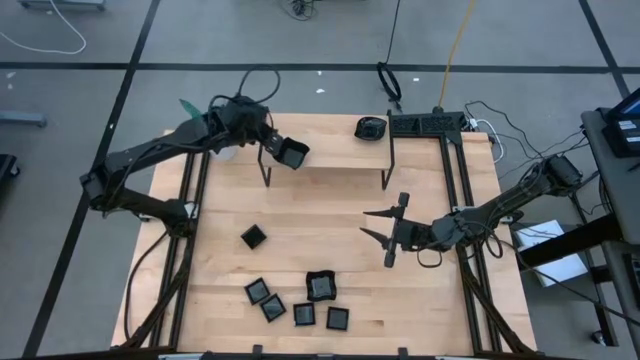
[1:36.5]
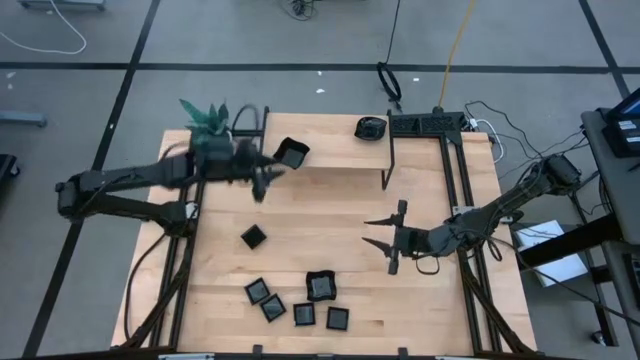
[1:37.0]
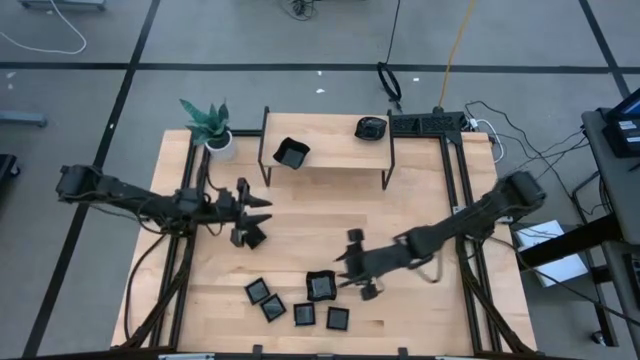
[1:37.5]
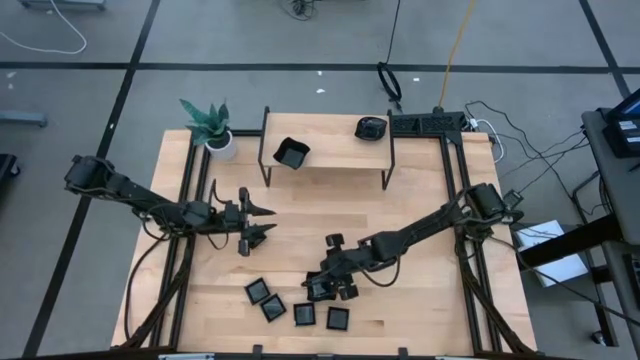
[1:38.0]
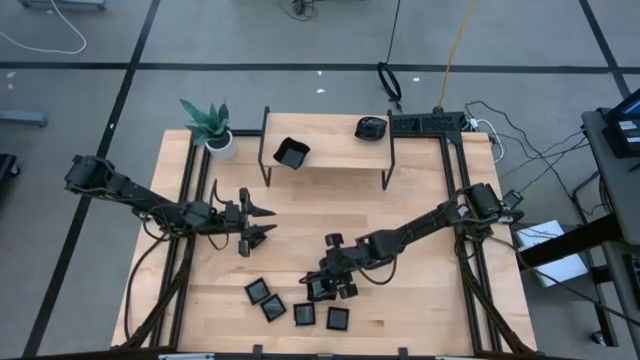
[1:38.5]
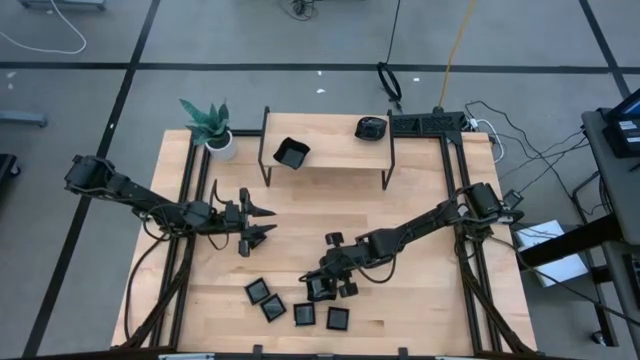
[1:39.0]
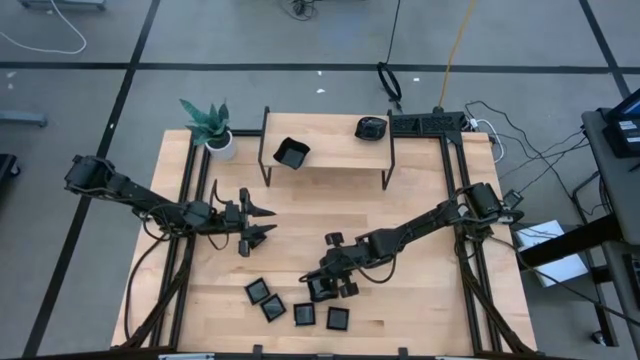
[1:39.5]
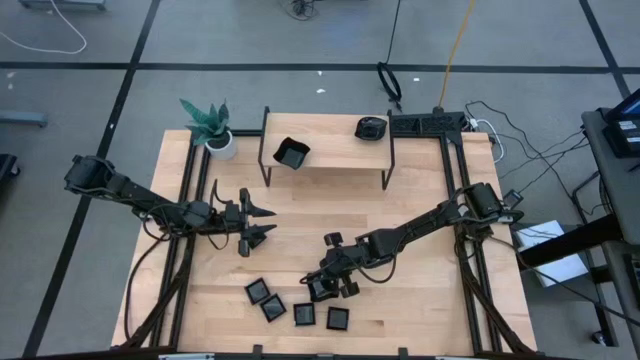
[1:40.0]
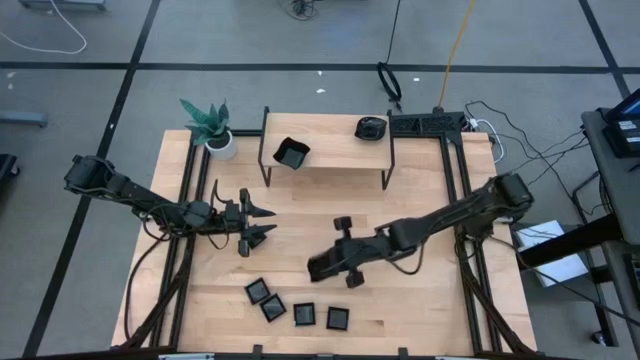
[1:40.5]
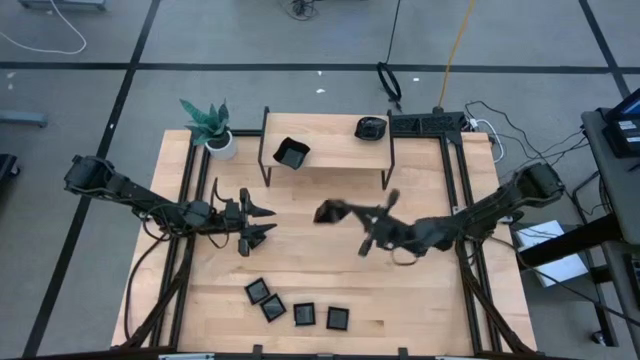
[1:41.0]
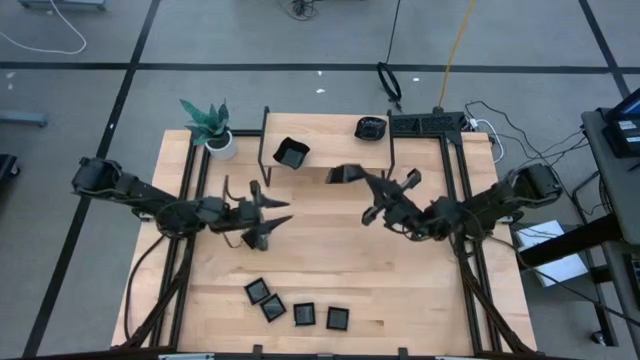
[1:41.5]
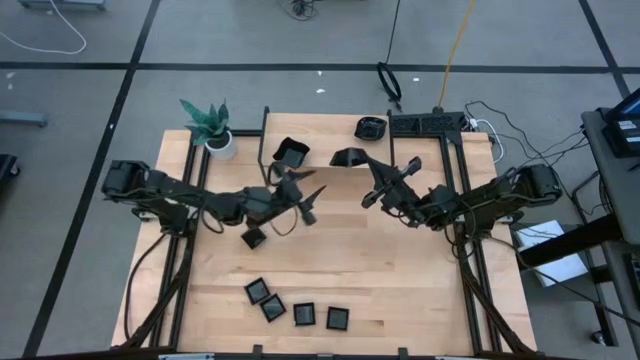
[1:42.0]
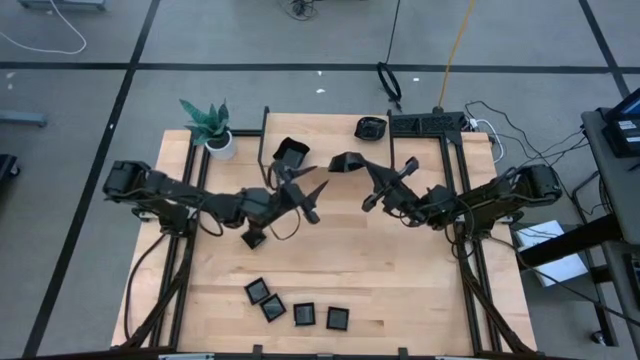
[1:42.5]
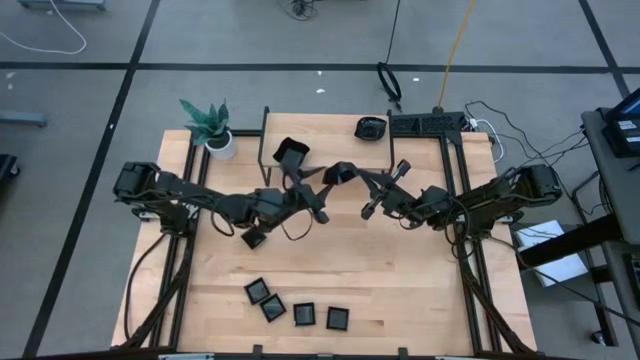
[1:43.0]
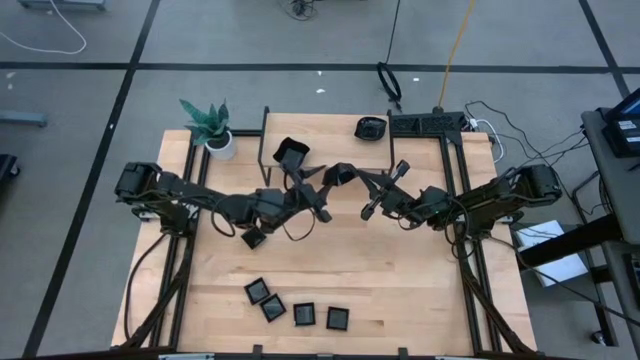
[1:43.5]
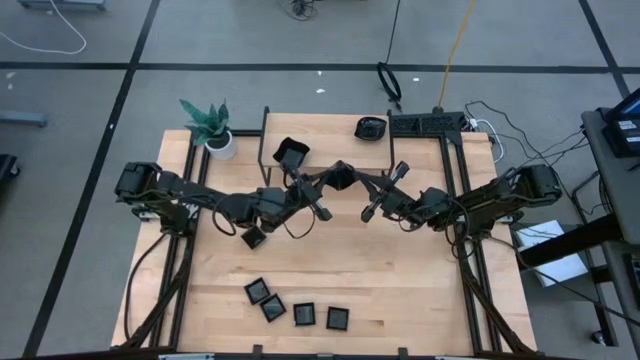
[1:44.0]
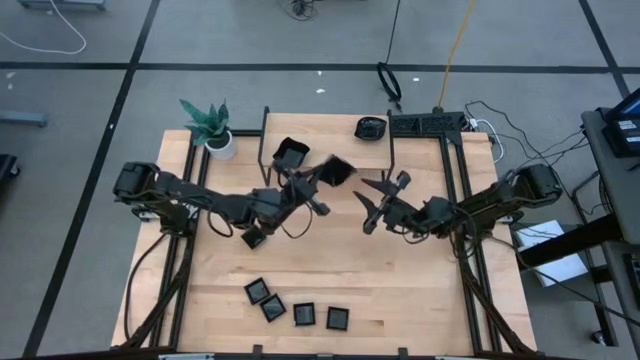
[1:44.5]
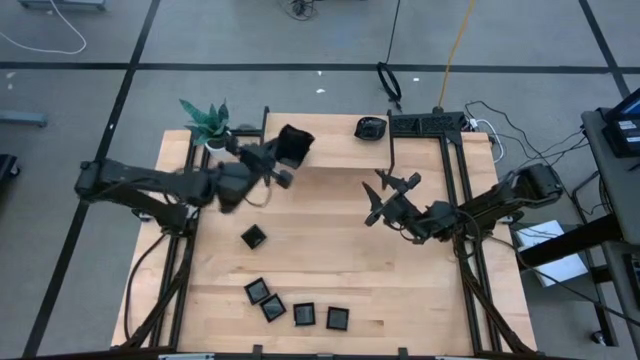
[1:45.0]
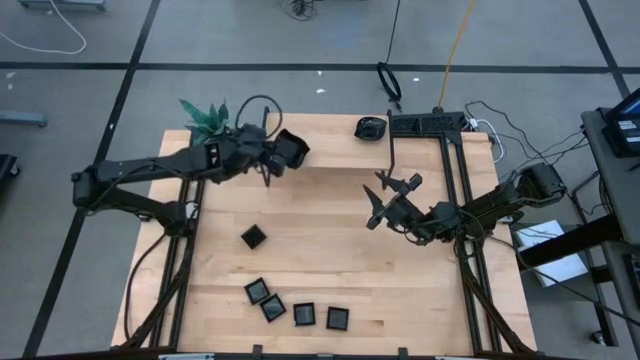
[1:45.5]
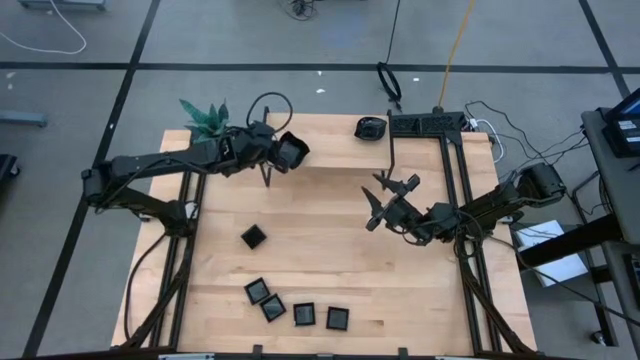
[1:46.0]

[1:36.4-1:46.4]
Task: Pick & Place Mini shaped plates
Stack the black distorted square plate on top of the other black distorted square plate on the shelf

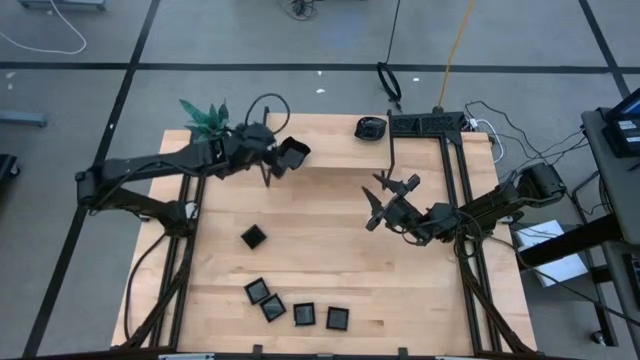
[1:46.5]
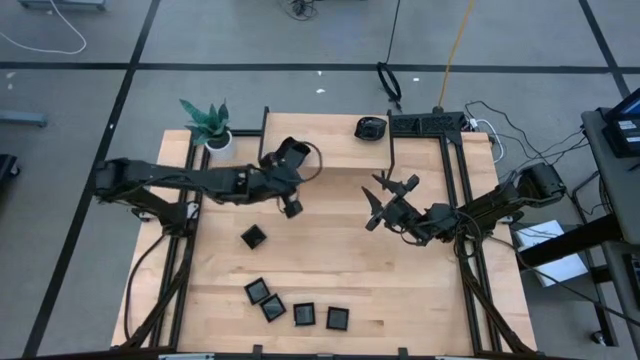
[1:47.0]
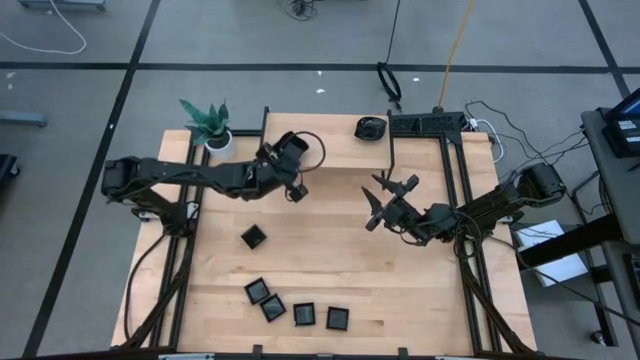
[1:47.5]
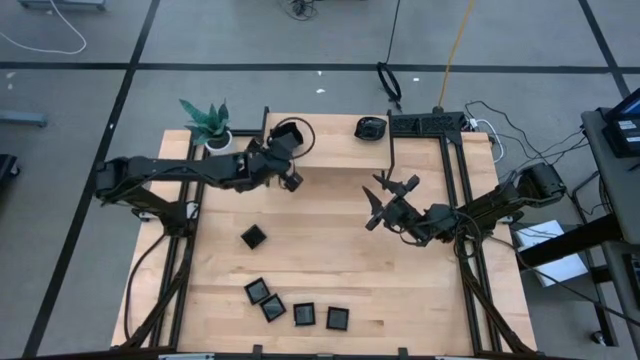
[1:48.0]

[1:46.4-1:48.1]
Adjust the stacked black distorted square plates on the shelf

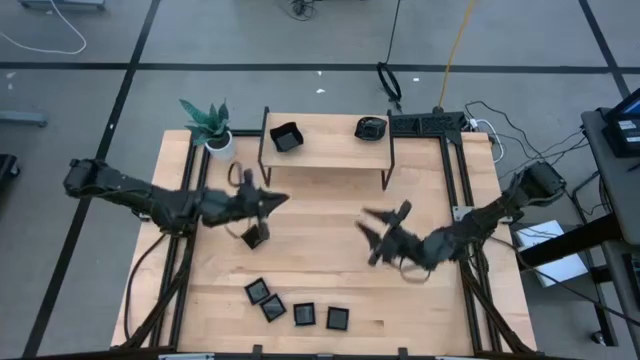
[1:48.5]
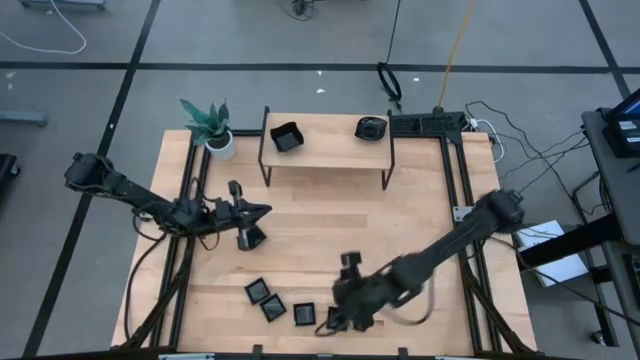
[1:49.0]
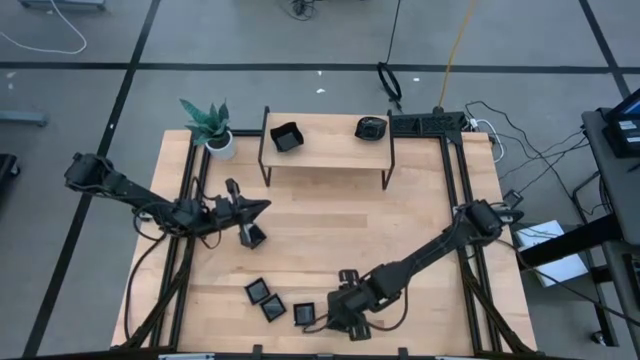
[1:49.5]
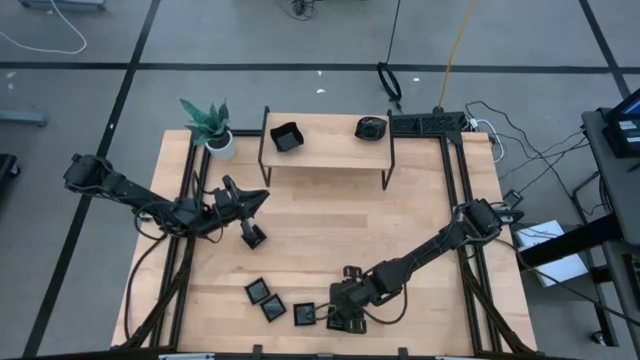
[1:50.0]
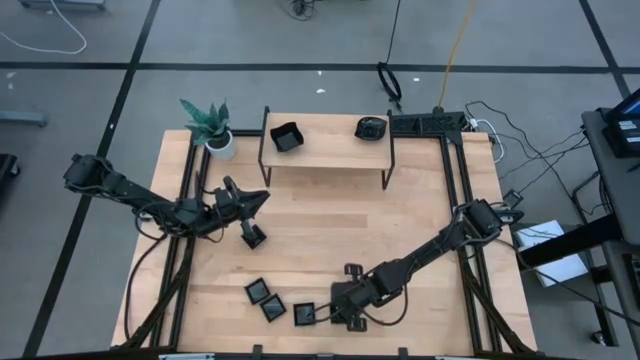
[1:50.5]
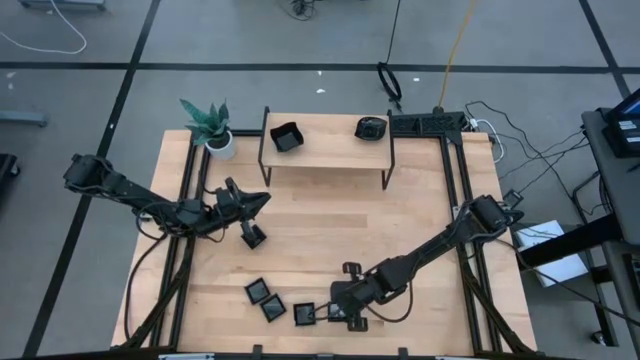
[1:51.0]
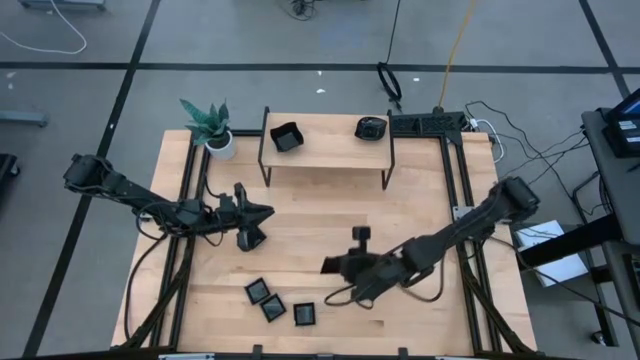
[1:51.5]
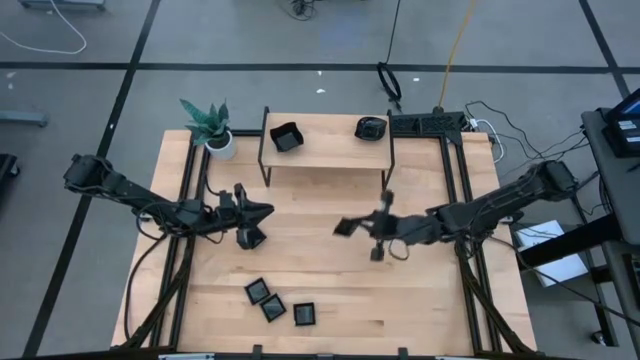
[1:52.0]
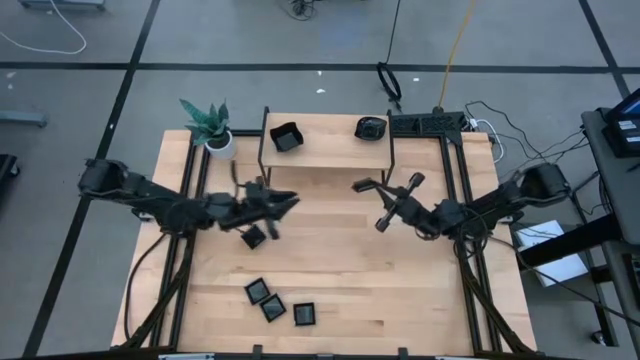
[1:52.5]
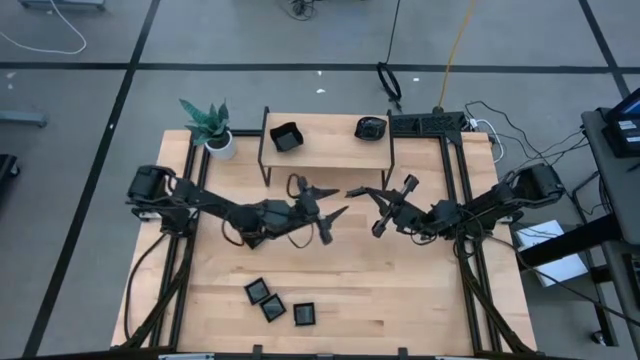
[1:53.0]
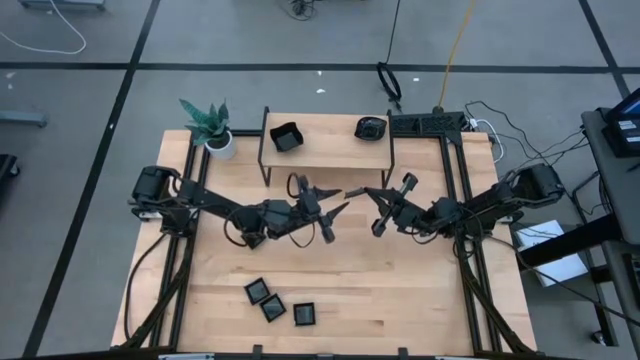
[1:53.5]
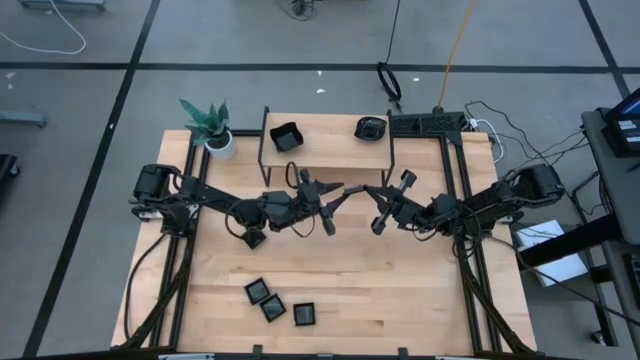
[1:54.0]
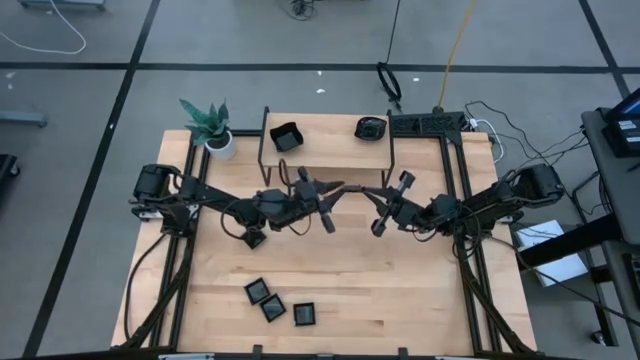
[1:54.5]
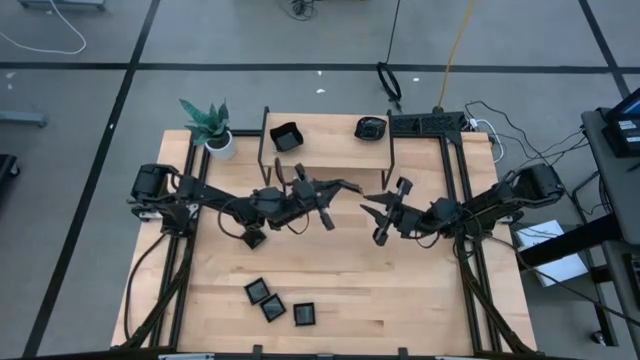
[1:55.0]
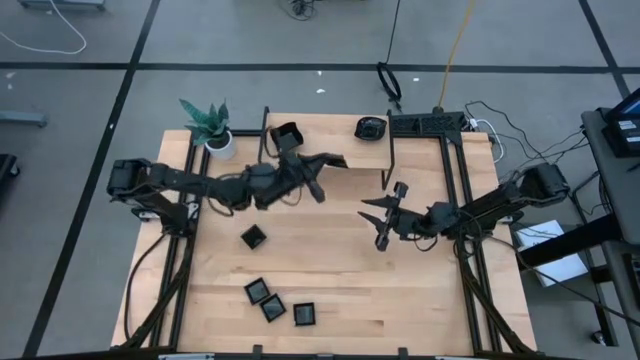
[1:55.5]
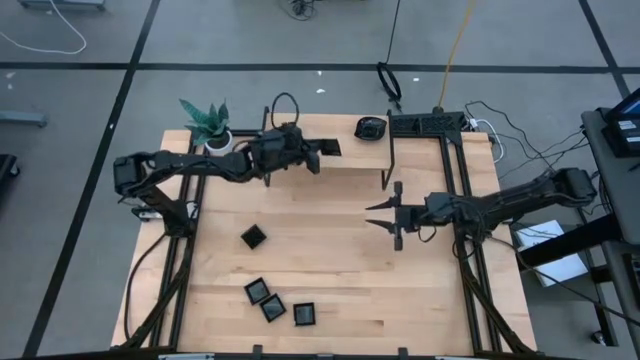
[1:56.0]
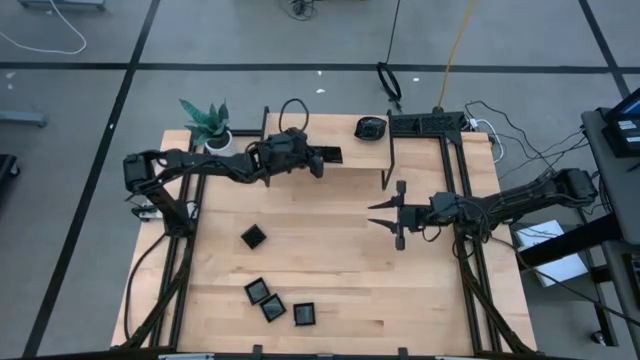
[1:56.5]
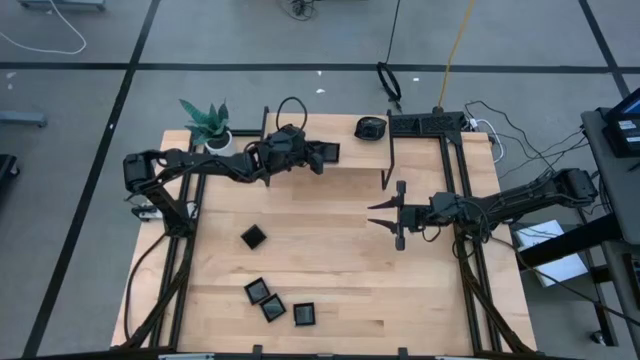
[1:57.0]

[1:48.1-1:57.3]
Put the black square plate on the shelf

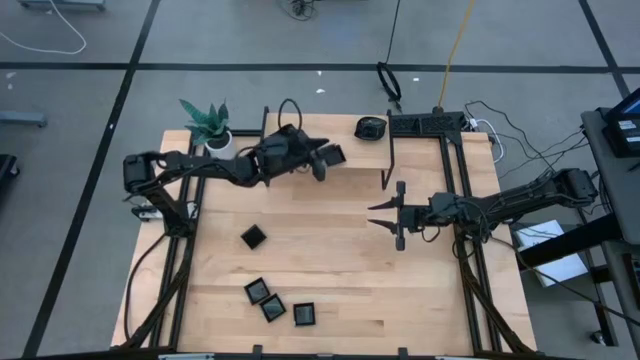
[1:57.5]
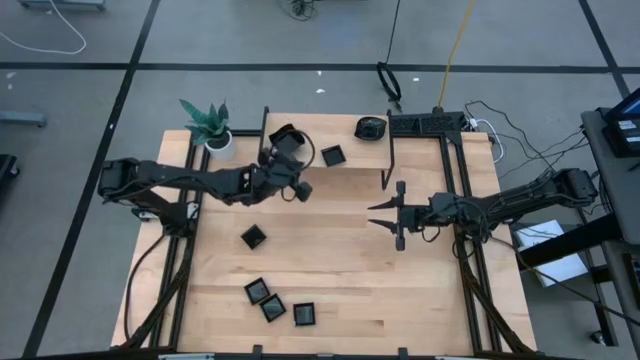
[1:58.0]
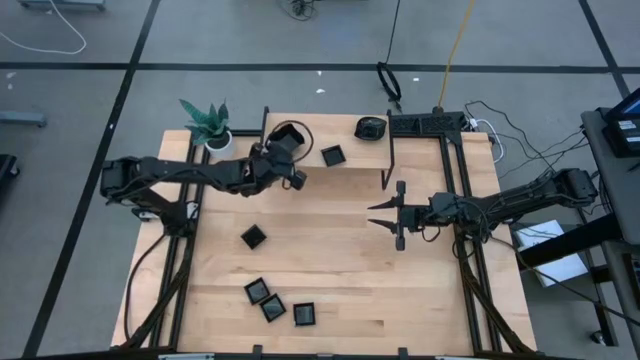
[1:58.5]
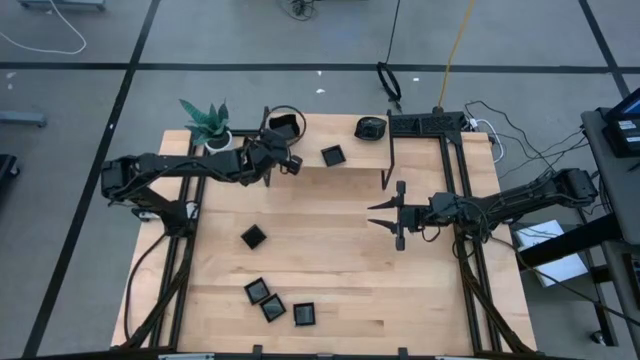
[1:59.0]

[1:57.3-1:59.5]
Adjust the stacked black distorted square plates on the shelf
